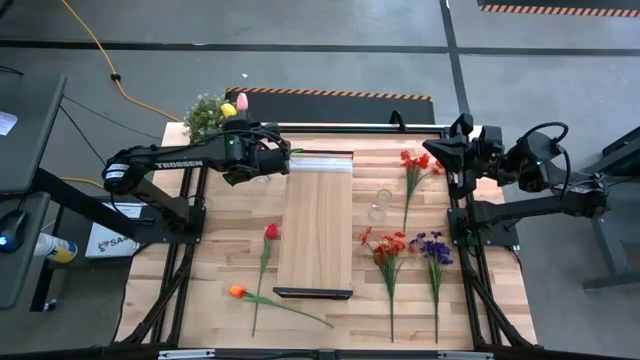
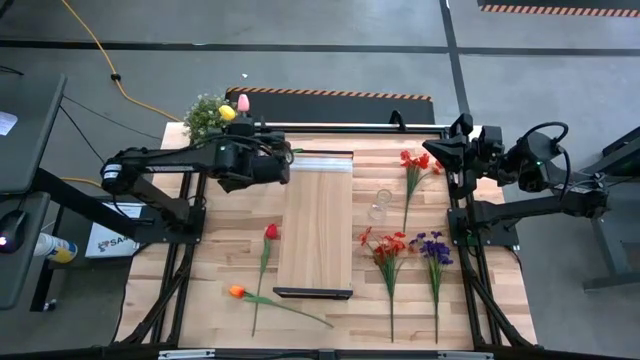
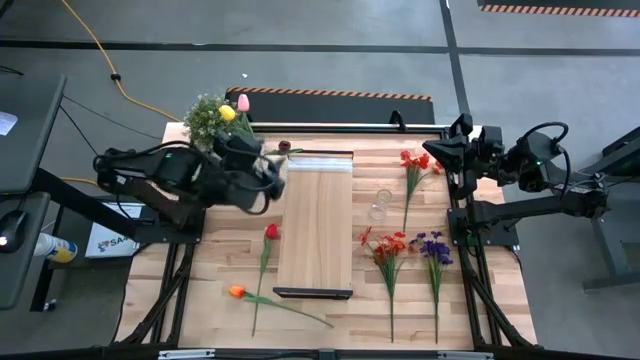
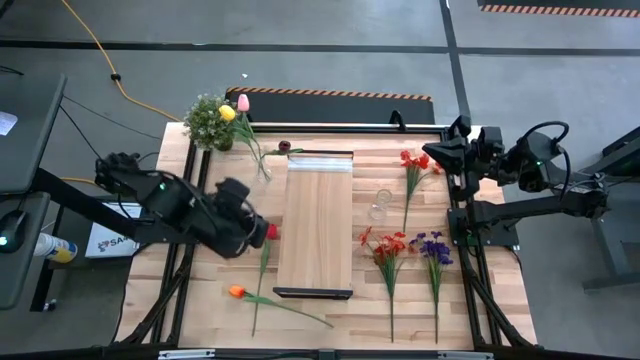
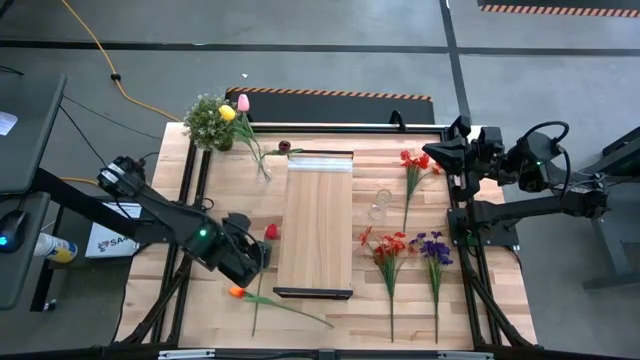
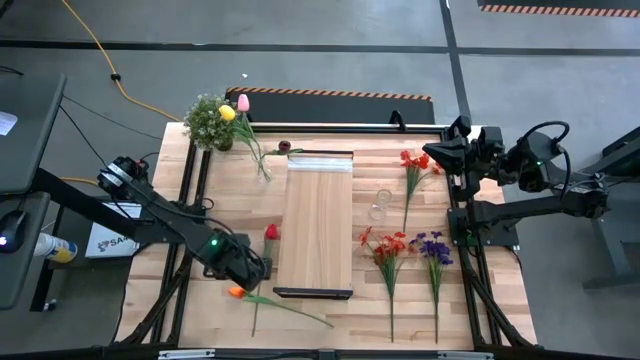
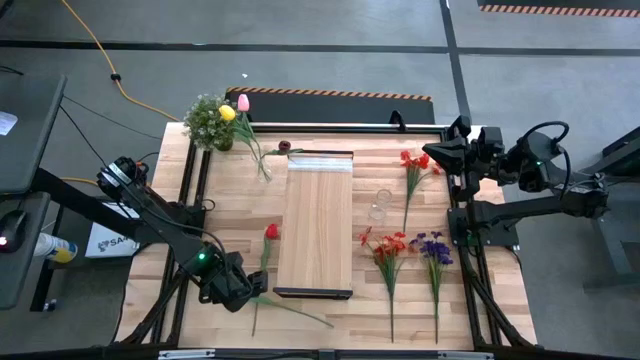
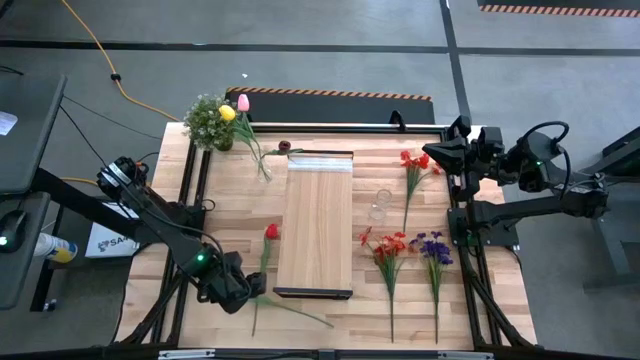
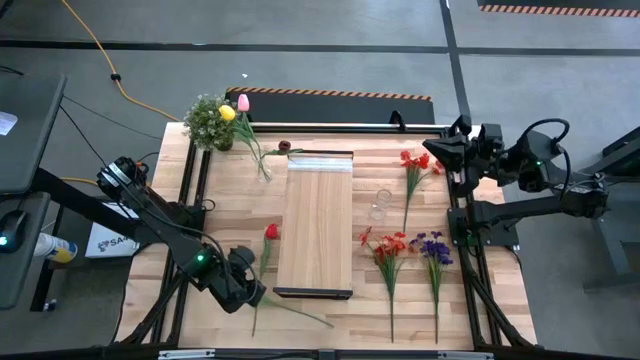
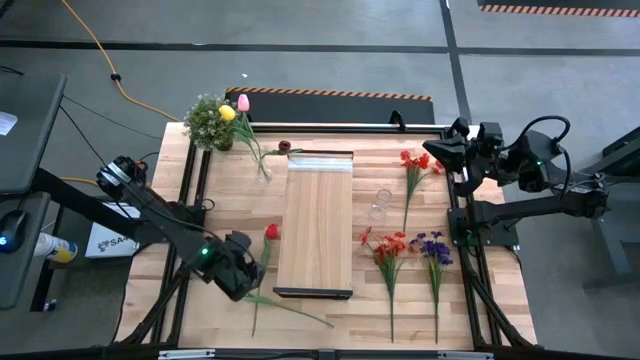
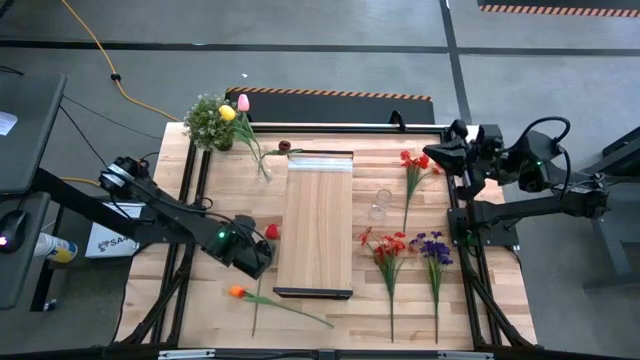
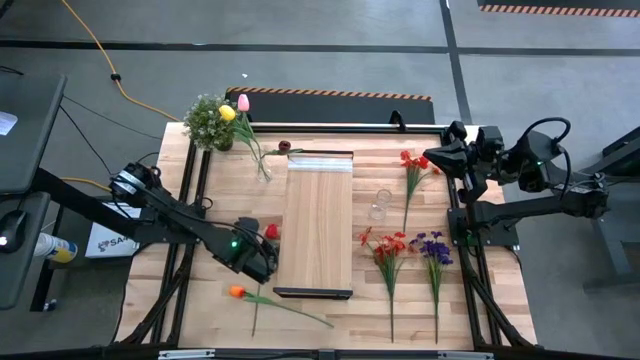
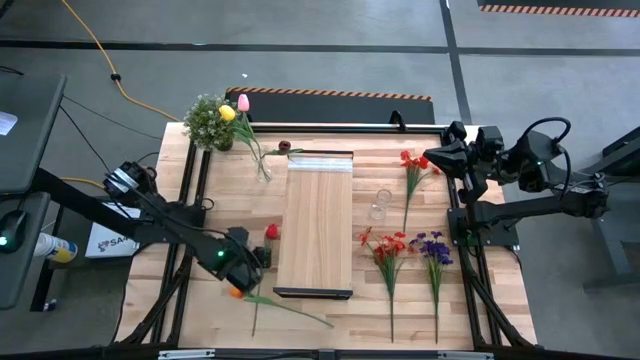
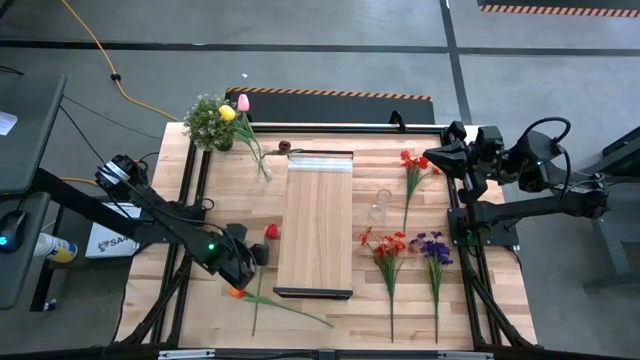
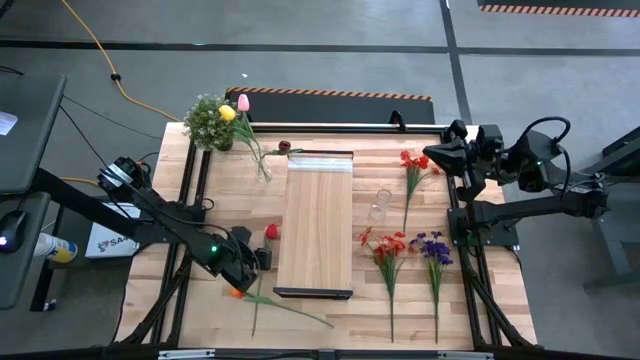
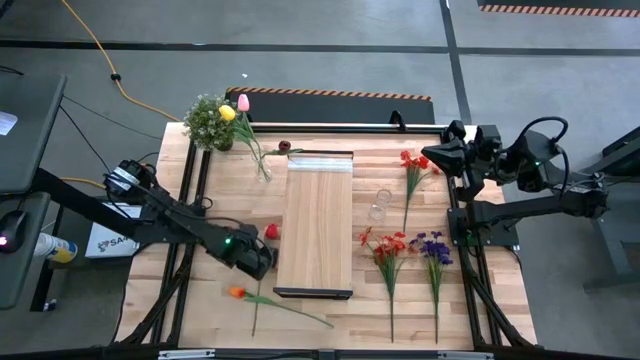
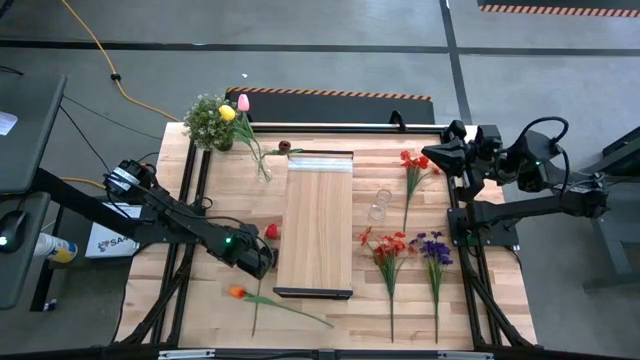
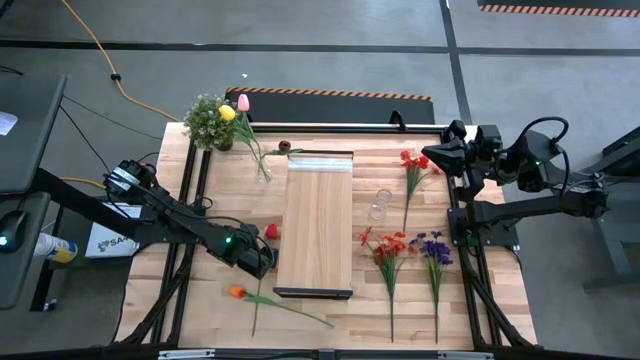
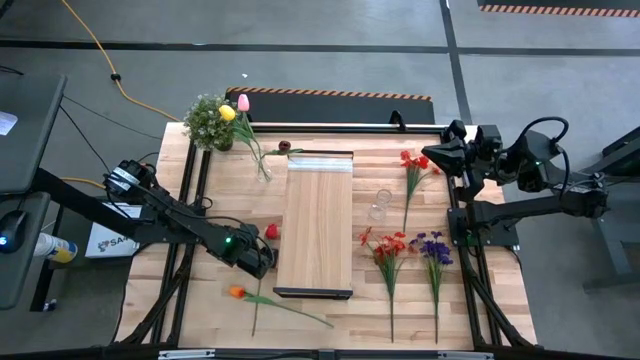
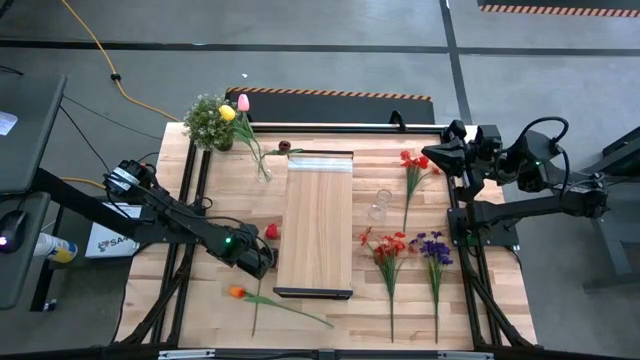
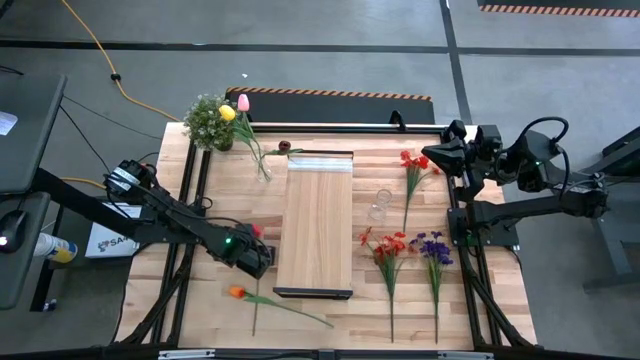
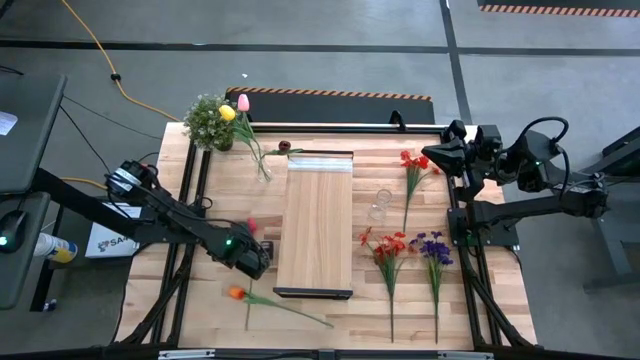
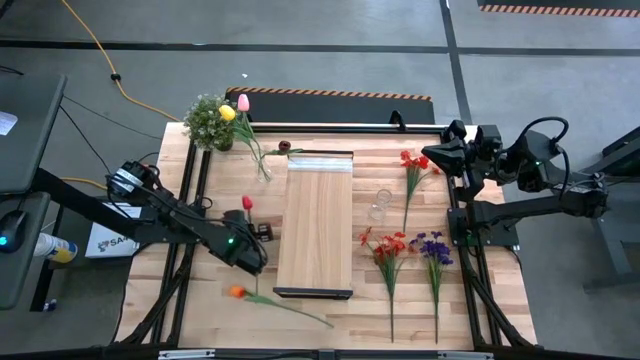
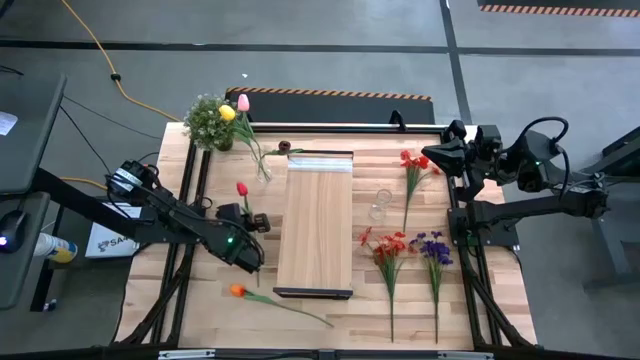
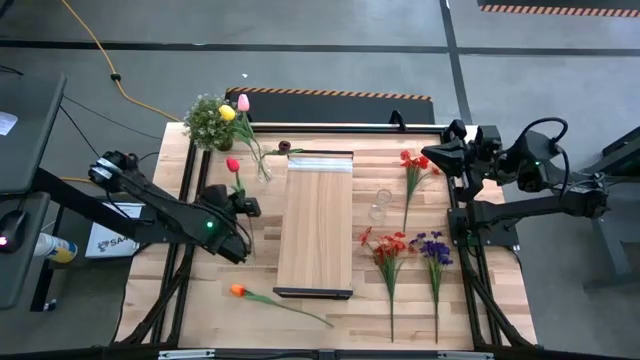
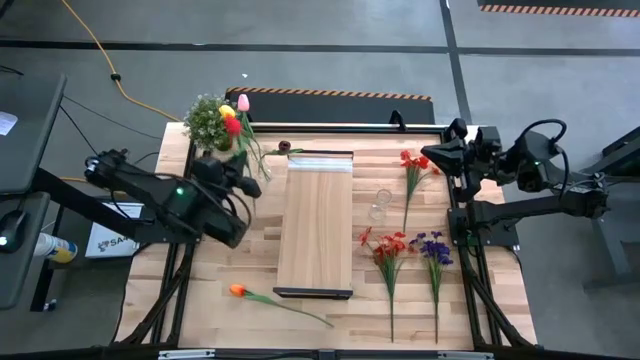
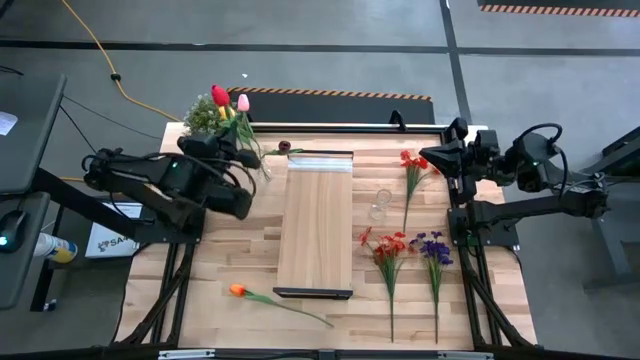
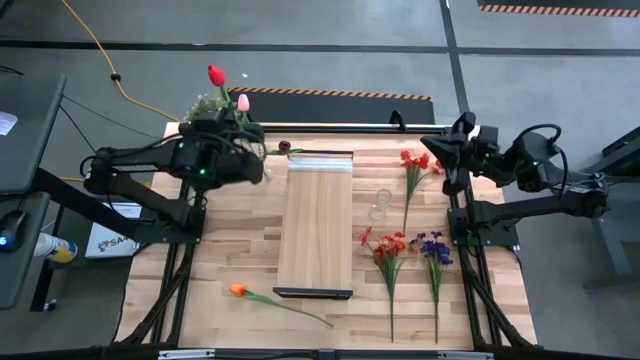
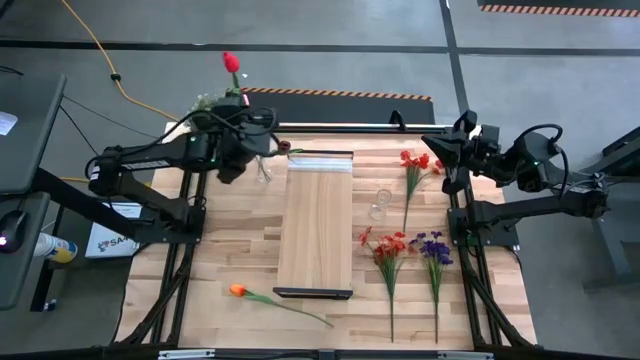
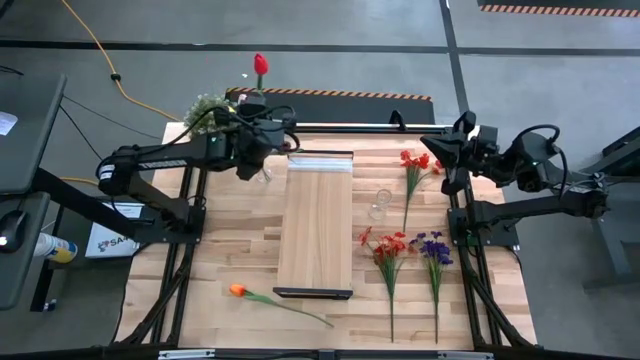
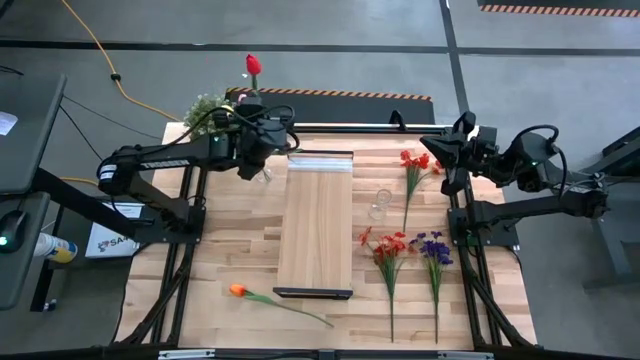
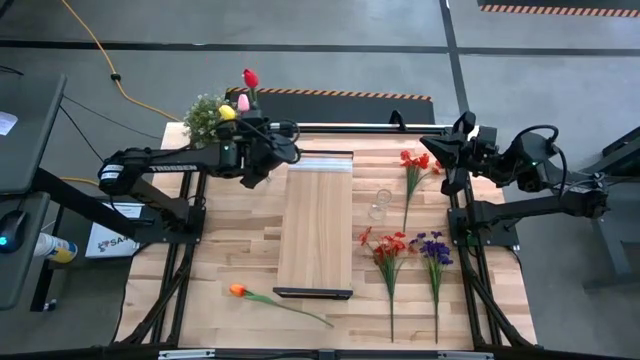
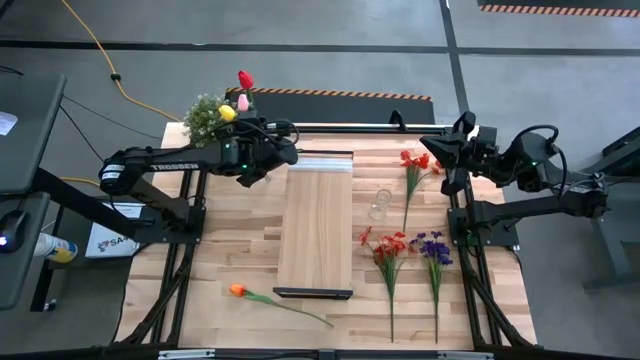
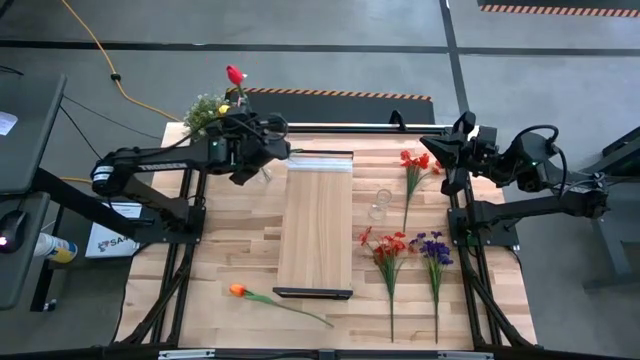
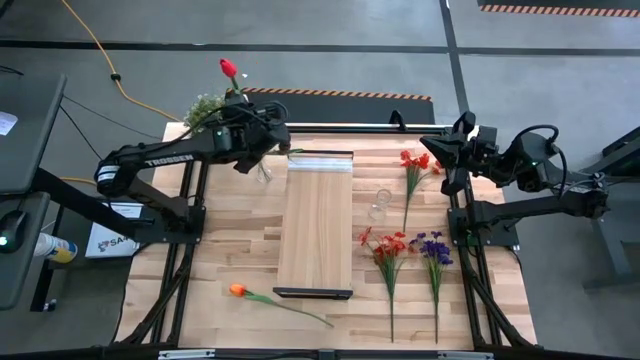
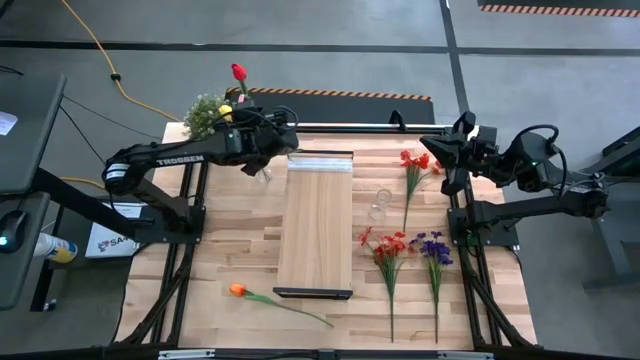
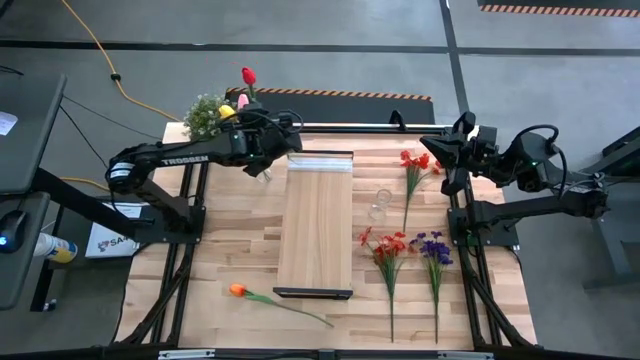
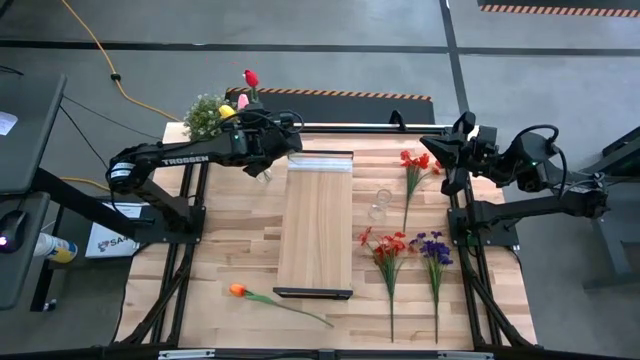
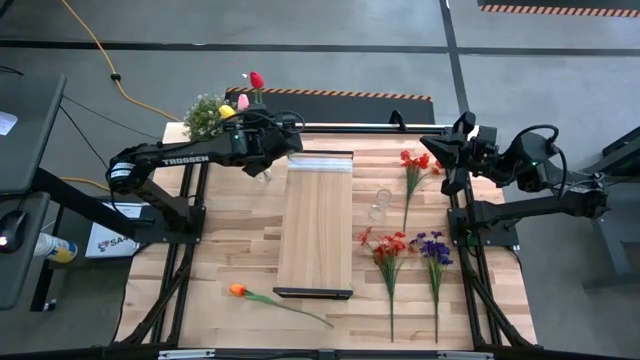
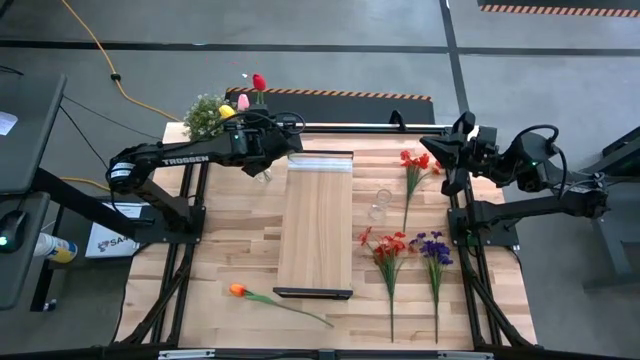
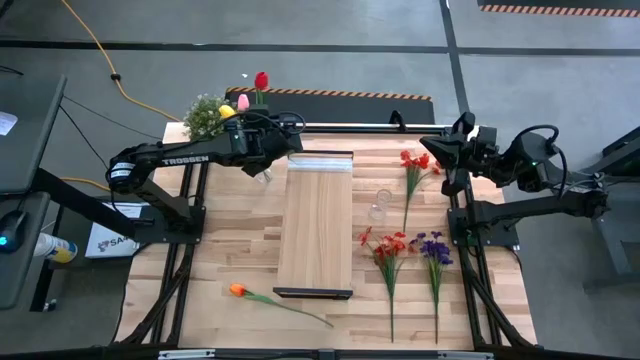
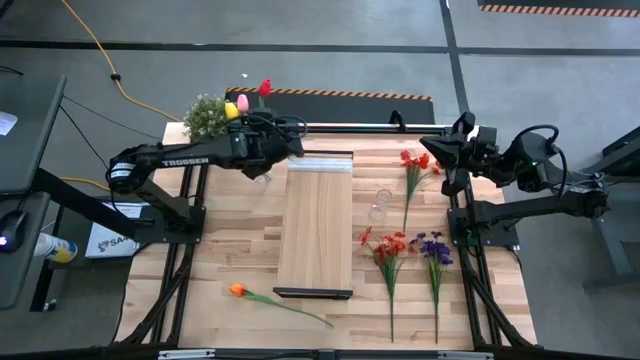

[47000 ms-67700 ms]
Task: Pick and place flowers into a vace then onto a shelf
Put the red flower into the left vase

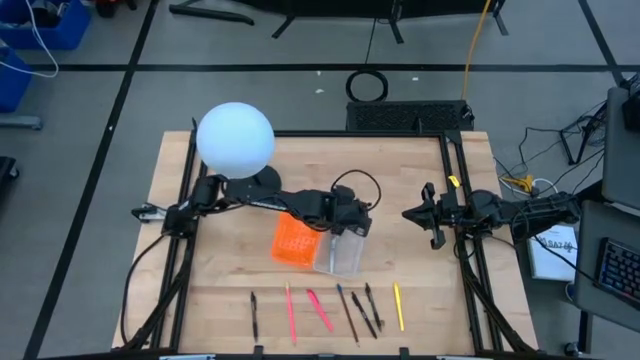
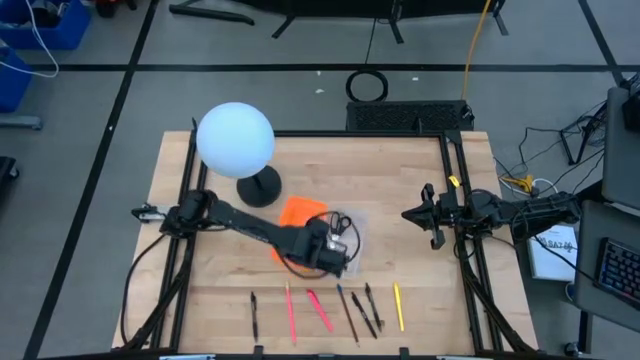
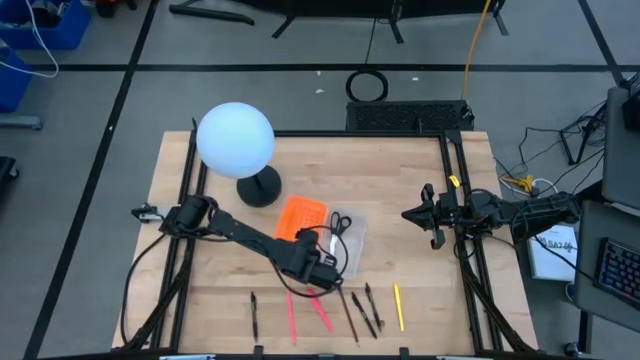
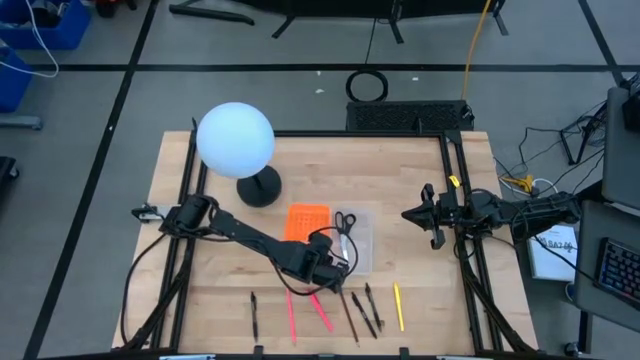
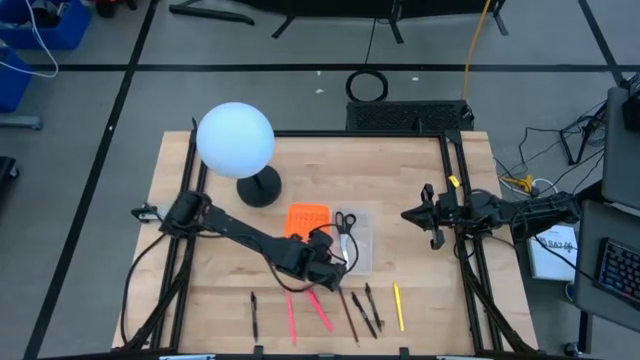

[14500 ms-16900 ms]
Task: Pick & place school supplies into a supply box
Adjust the orange bin
